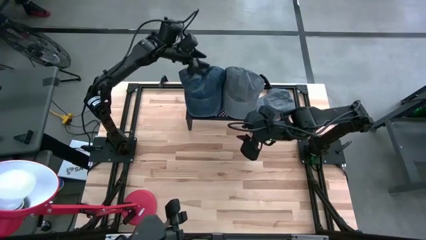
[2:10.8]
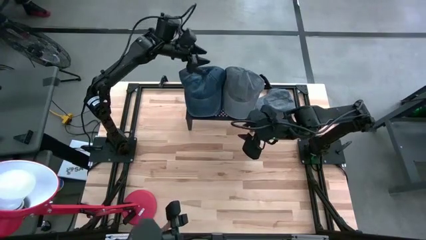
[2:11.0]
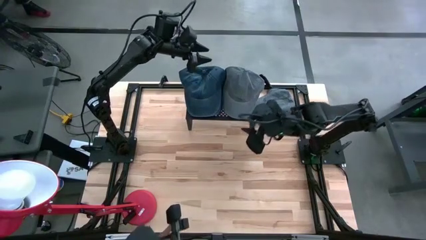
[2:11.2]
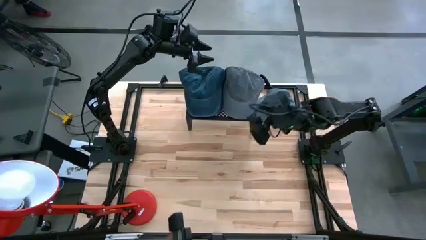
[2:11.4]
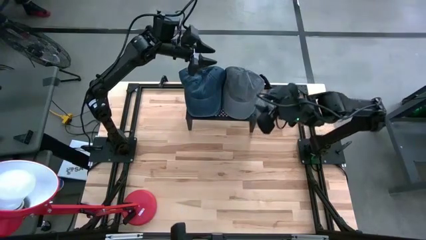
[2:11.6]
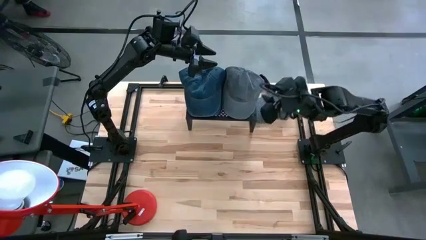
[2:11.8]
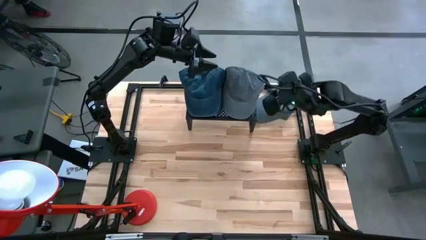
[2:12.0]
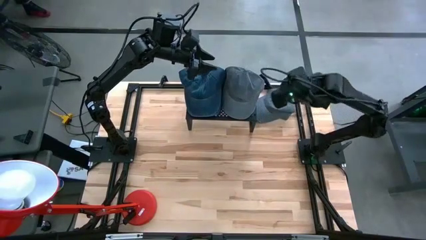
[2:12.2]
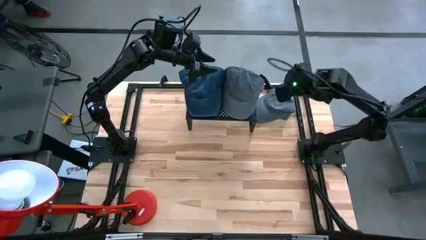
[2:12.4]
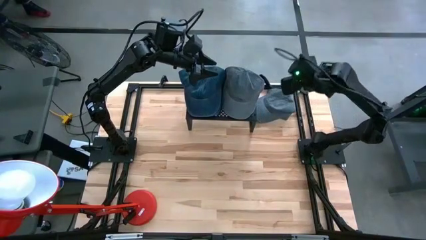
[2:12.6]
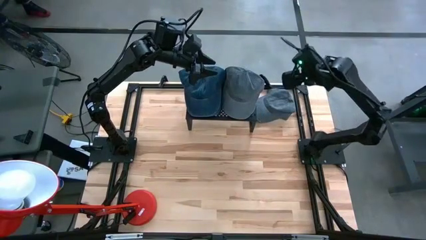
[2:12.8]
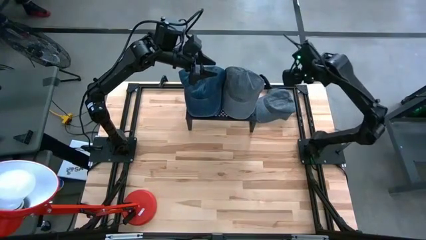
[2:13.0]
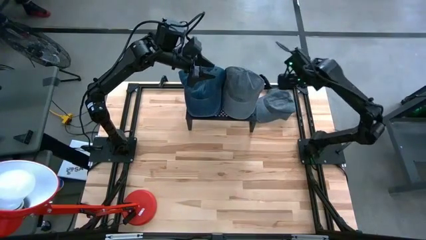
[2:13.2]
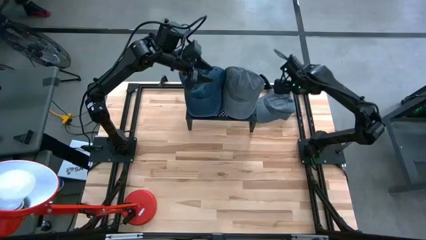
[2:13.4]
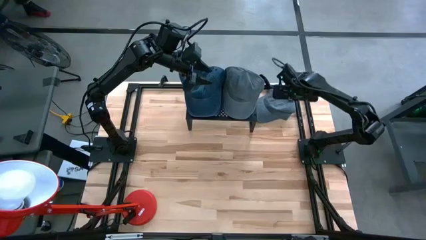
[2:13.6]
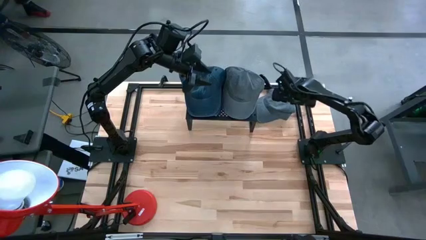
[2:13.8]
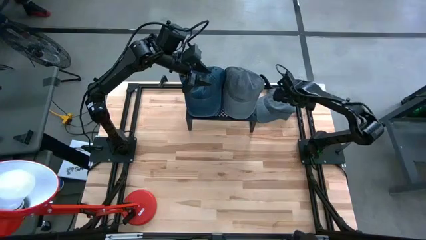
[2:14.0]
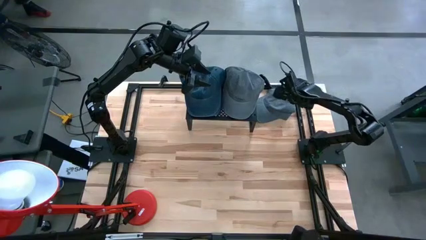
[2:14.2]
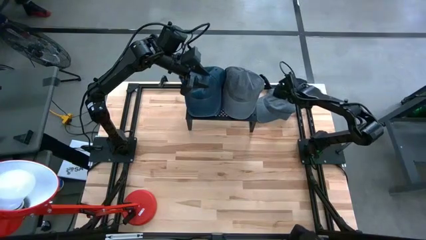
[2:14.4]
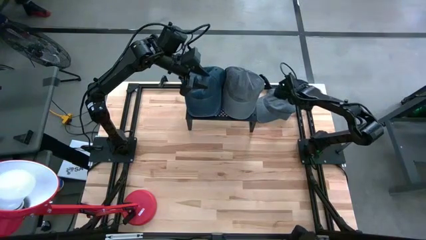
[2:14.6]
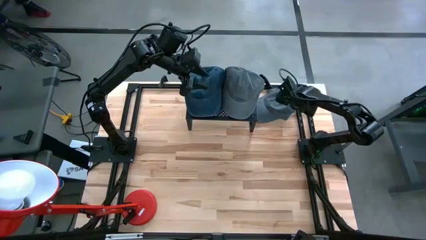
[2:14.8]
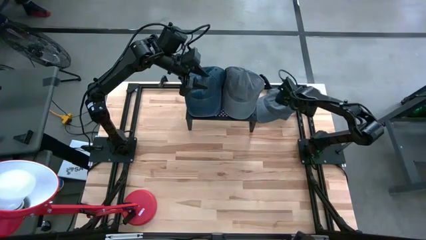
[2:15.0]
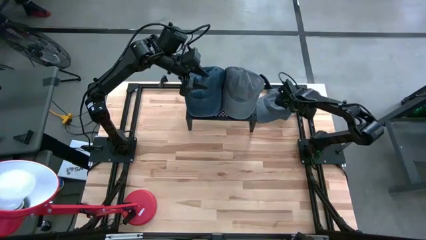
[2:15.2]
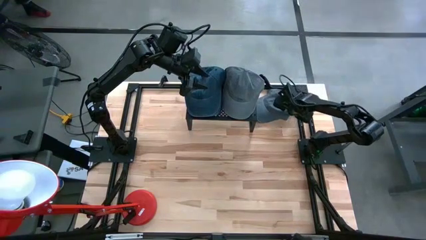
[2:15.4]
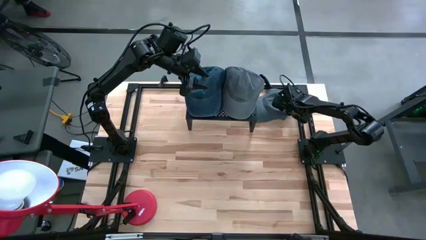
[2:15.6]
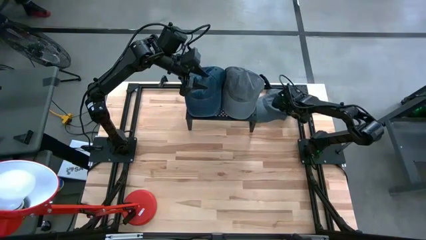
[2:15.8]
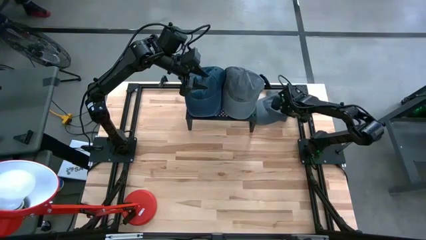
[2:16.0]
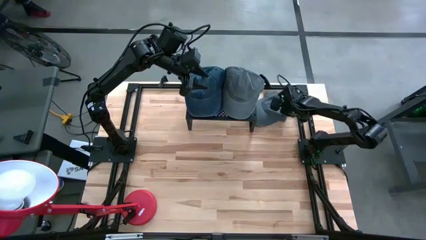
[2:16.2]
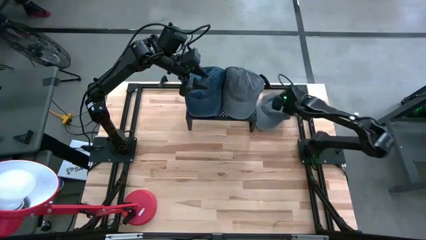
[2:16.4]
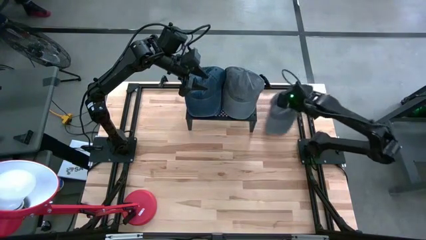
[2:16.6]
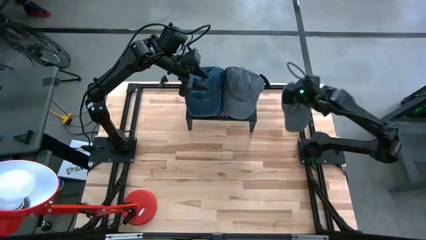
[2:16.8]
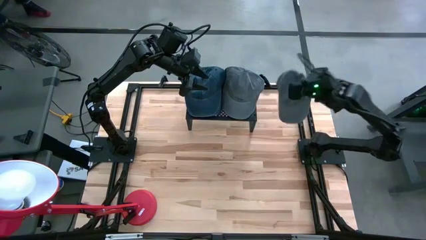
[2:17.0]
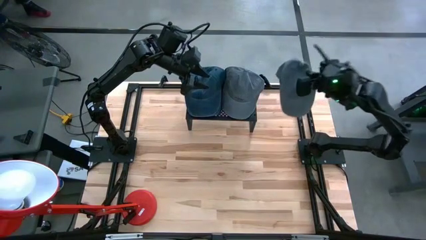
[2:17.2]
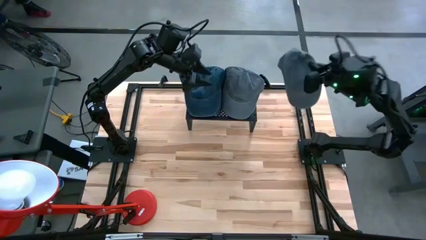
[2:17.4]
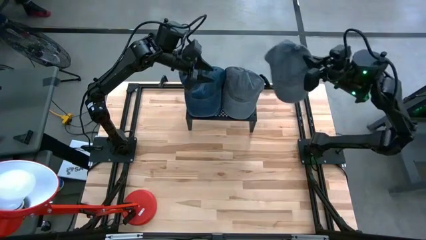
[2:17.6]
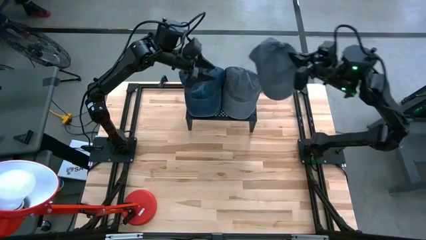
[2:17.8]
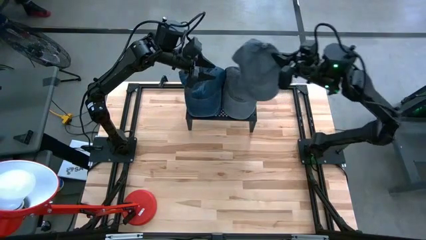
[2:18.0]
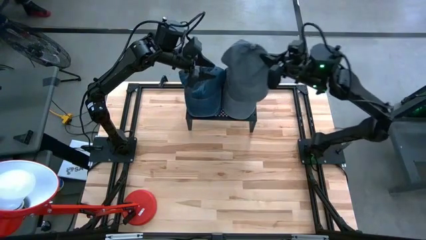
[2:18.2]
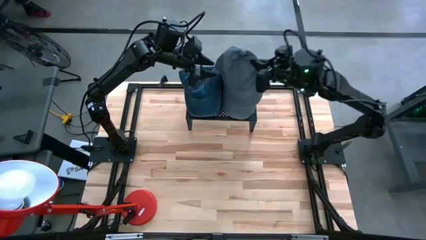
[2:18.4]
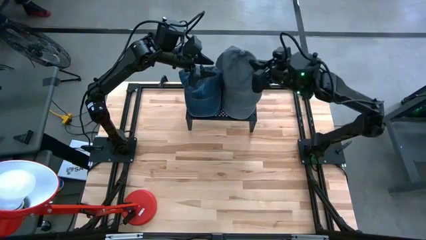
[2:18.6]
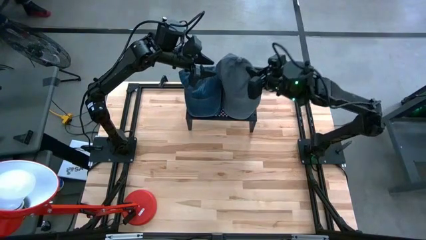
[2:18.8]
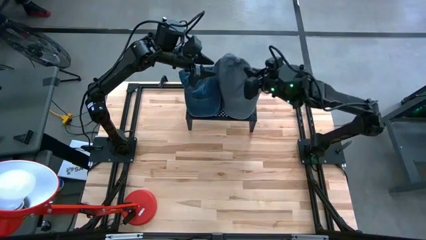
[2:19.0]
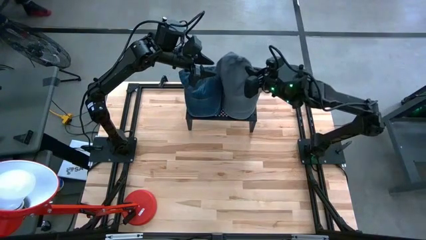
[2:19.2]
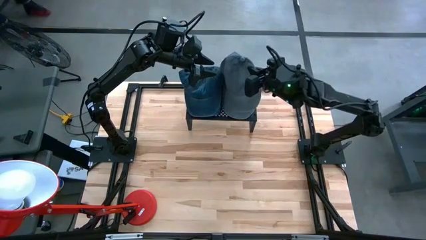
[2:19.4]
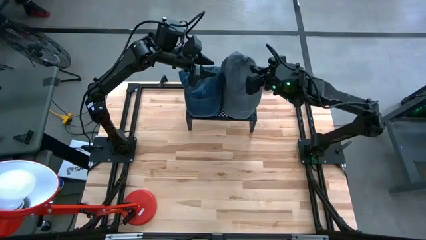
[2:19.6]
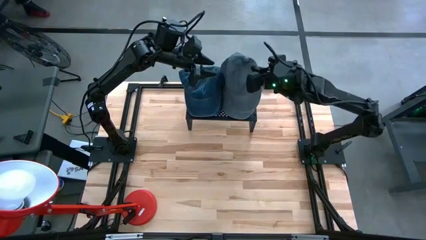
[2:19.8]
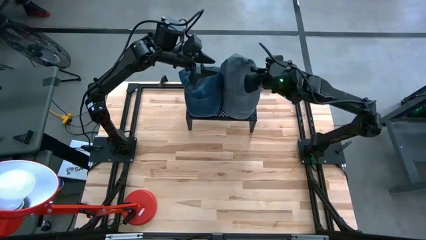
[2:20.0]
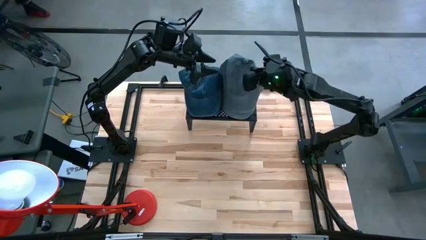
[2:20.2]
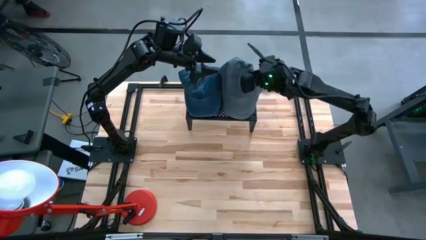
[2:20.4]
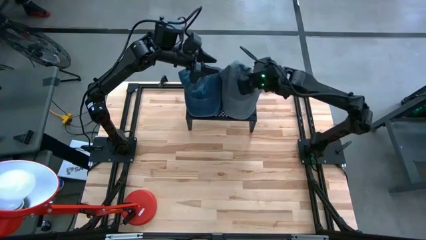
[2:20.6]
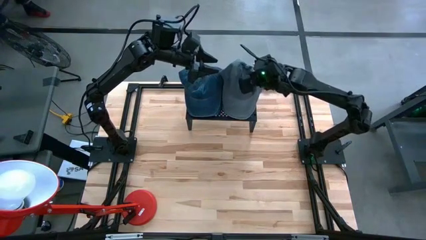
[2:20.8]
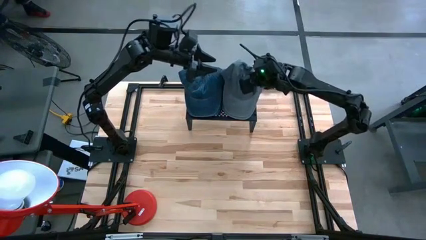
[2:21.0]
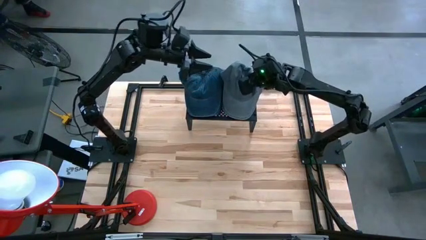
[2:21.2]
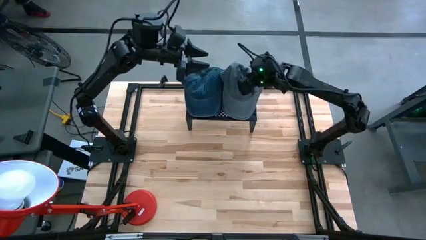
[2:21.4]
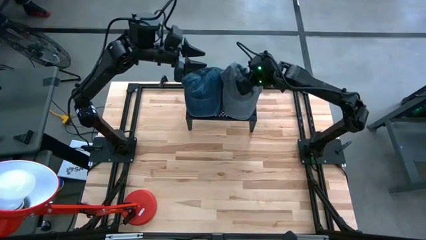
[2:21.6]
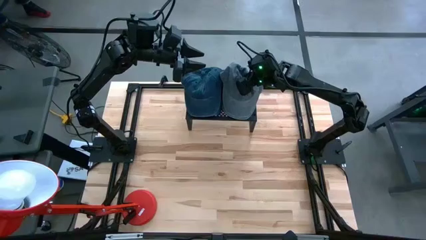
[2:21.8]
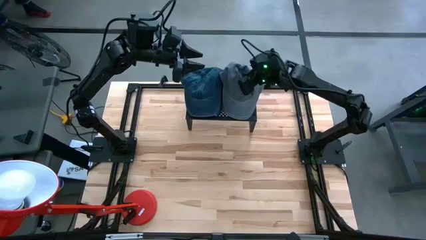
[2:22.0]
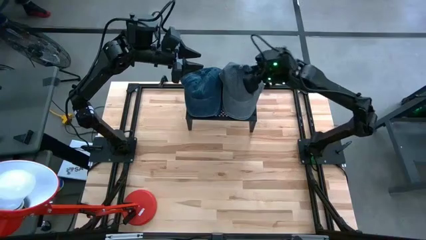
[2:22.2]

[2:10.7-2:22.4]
Task: Pick & Place hat
Stack the gray cap on top of the stacked gray caps on the shelf

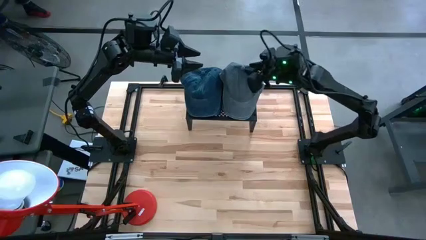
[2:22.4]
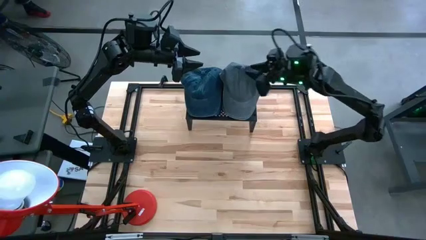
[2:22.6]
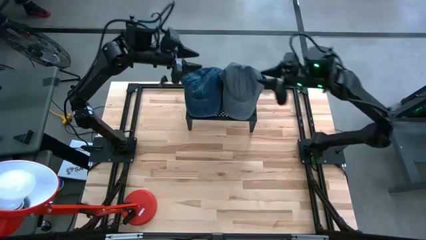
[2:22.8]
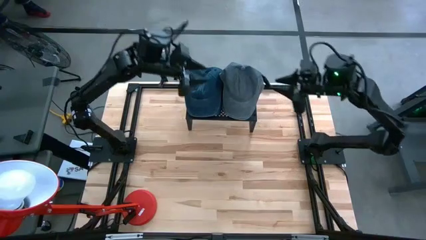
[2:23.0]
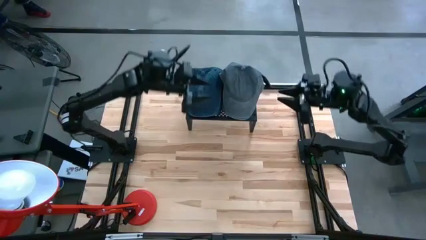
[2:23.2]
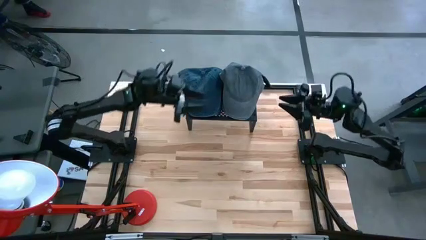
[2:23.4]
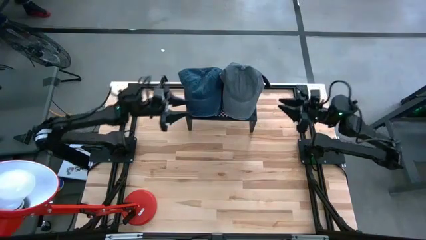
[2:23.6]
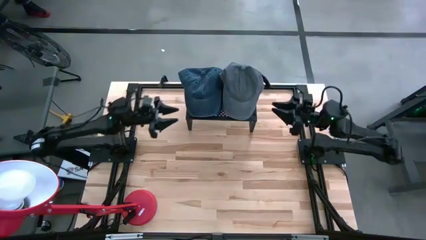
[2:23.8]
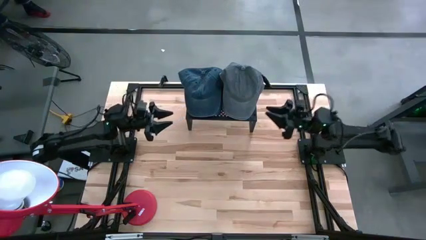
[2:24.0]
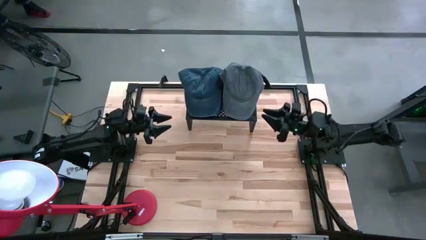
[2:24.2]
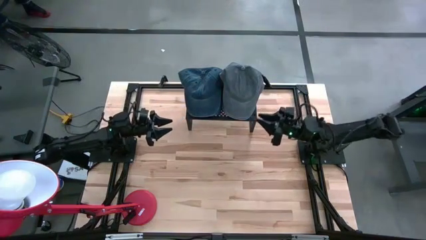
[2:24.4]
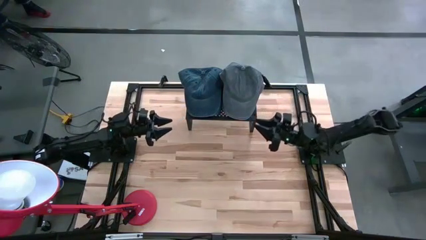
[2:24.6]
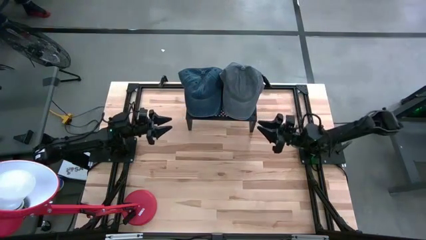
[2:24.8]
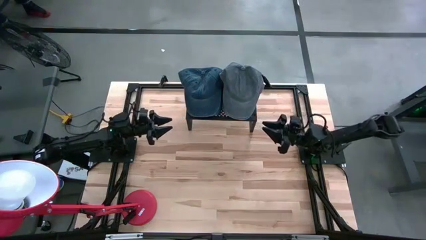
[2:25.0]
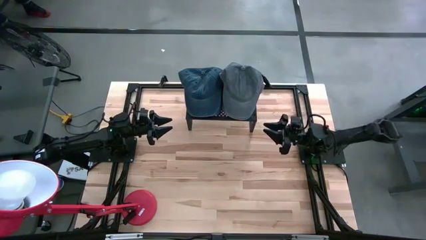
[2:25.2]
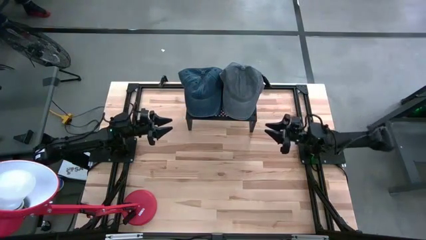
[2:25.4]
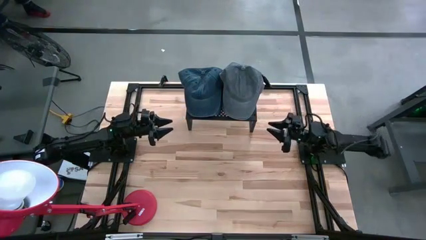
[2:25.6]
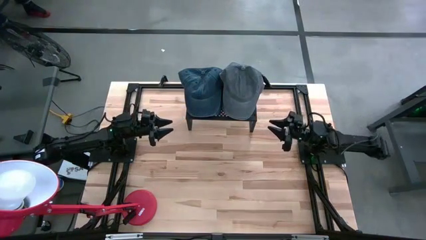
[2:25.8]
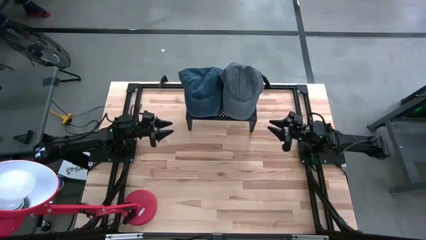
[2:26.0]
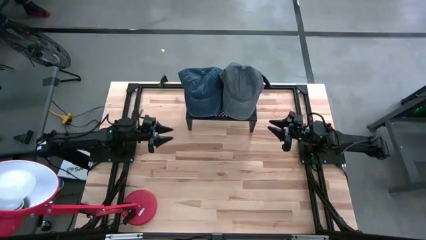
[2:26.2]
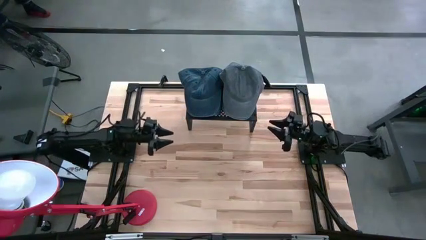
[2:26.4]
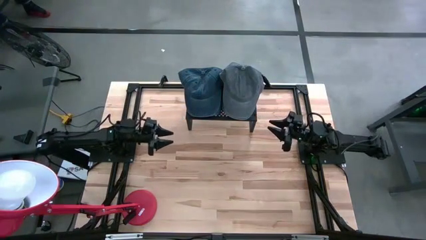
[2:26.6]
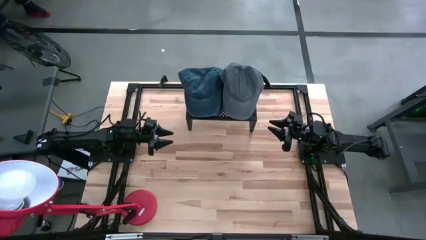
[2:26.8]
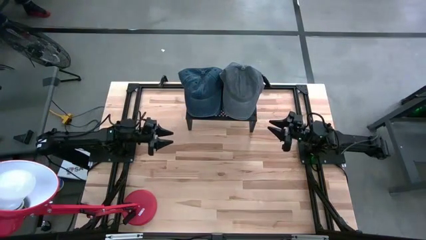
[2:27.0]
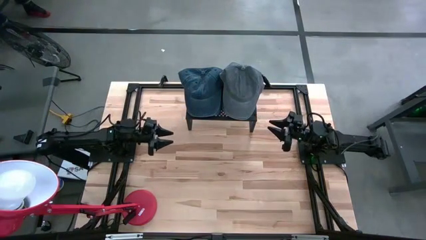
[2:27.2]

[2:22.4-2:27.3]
Return to Home Position
